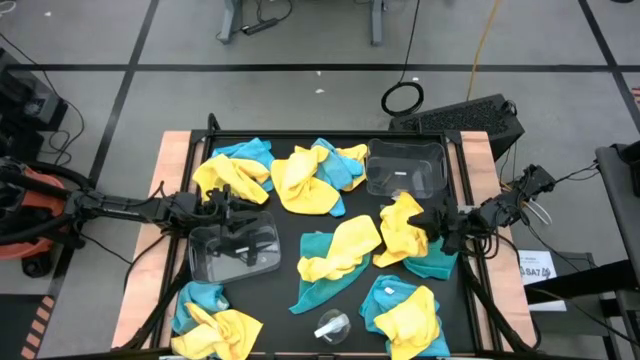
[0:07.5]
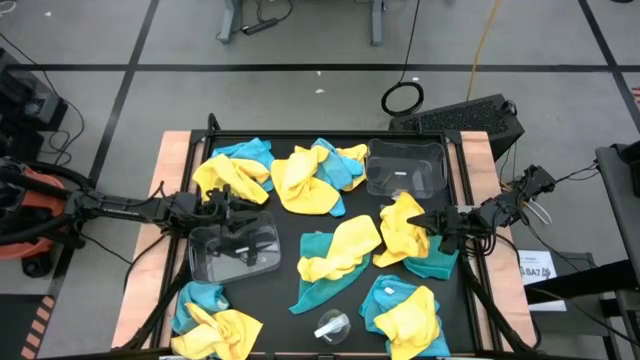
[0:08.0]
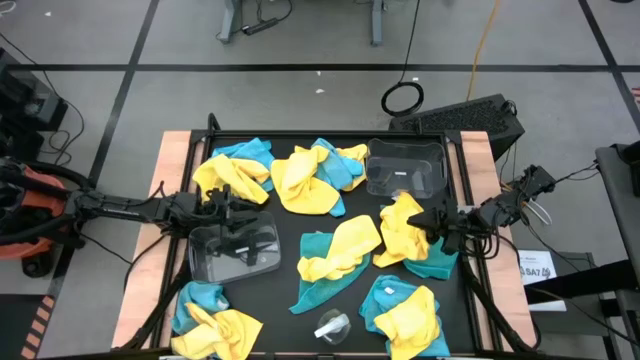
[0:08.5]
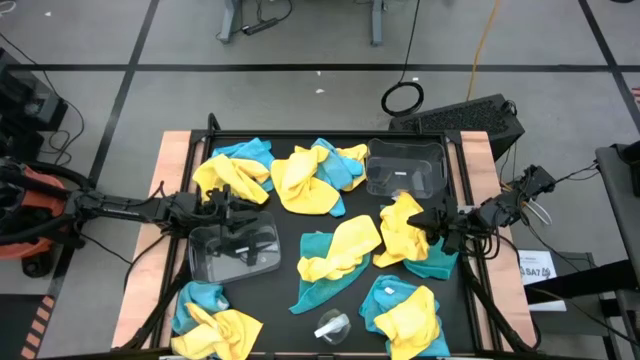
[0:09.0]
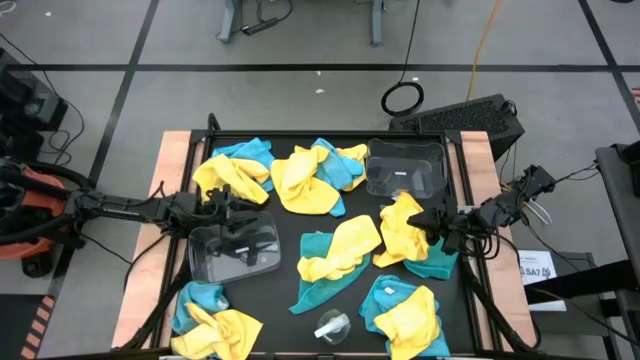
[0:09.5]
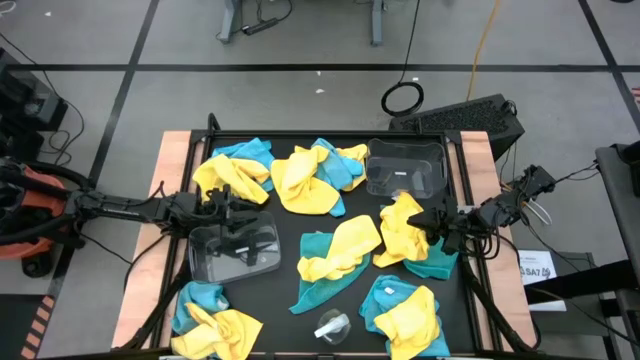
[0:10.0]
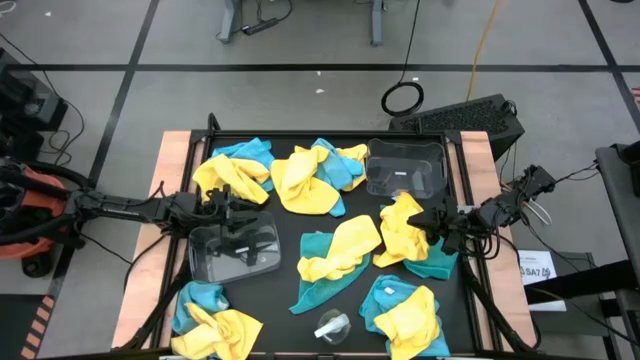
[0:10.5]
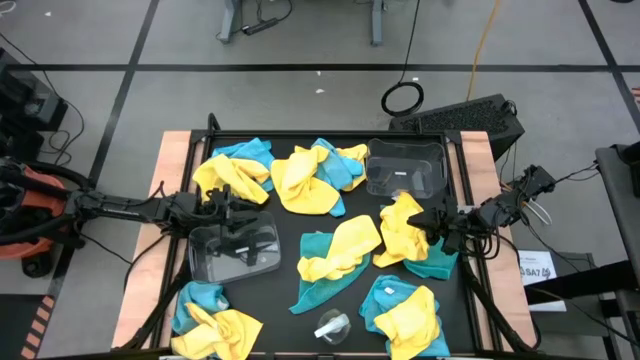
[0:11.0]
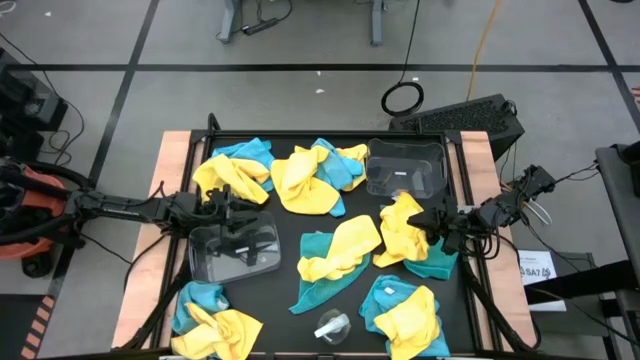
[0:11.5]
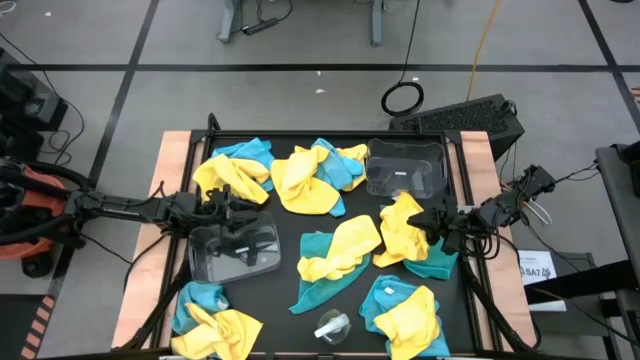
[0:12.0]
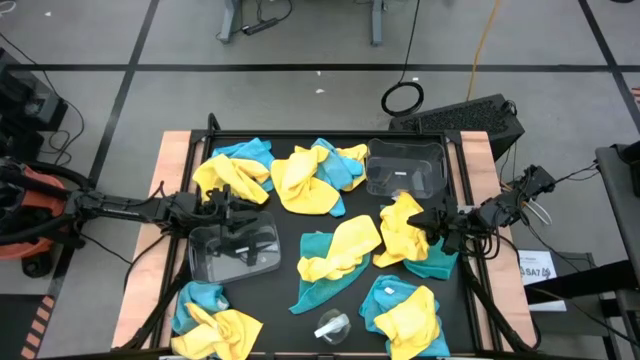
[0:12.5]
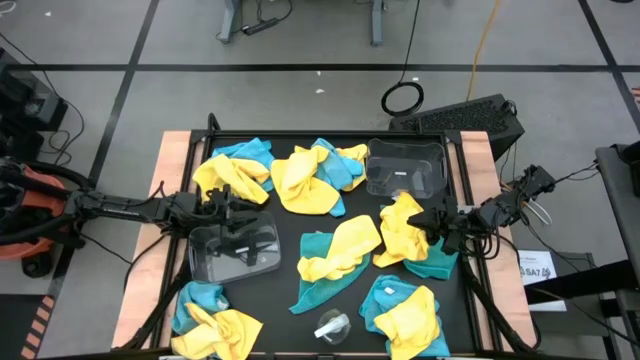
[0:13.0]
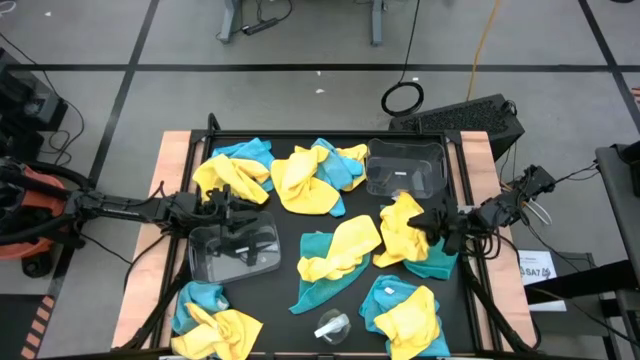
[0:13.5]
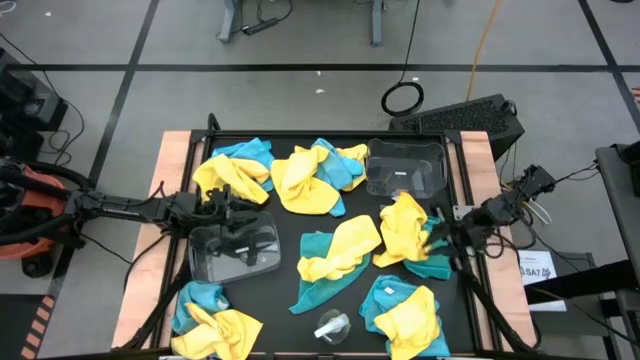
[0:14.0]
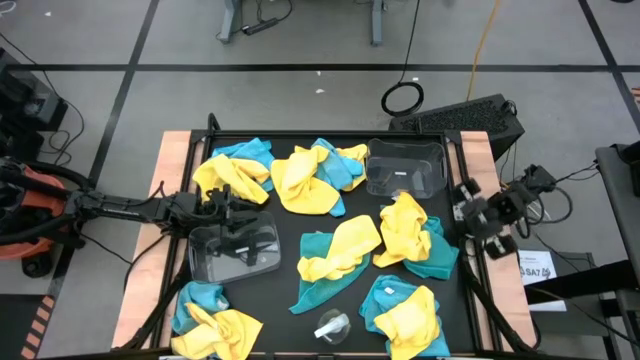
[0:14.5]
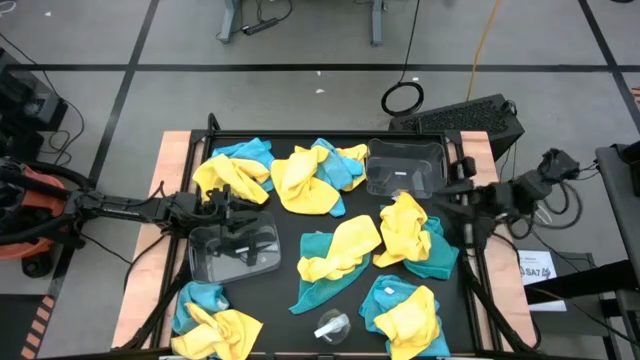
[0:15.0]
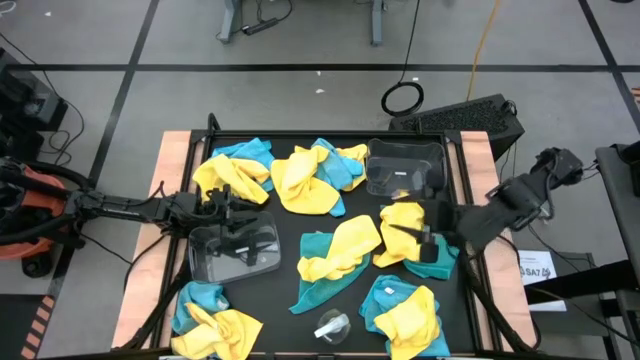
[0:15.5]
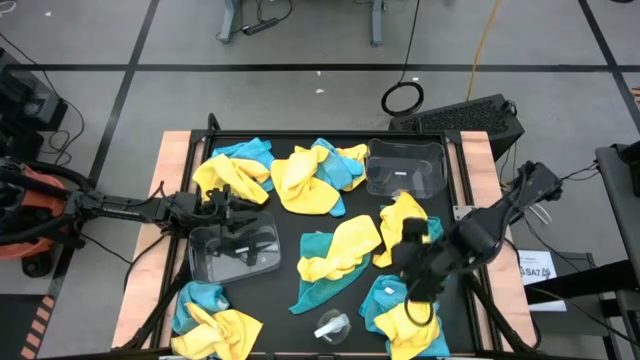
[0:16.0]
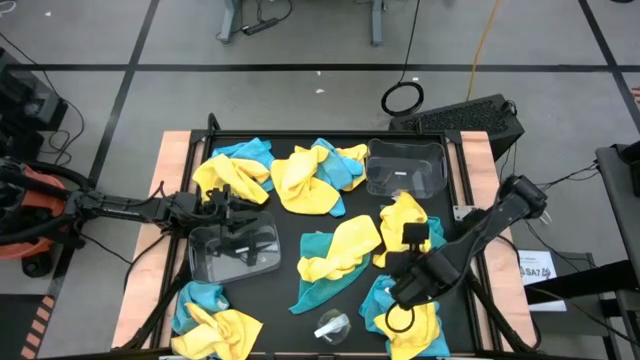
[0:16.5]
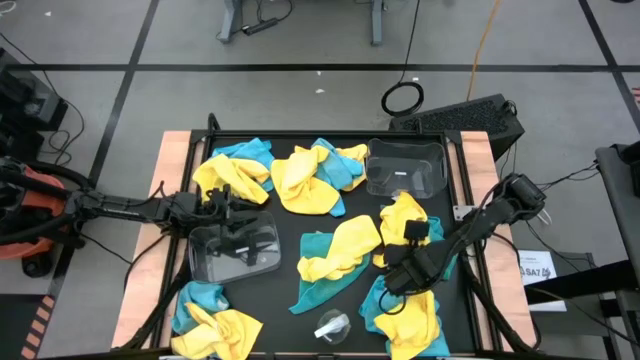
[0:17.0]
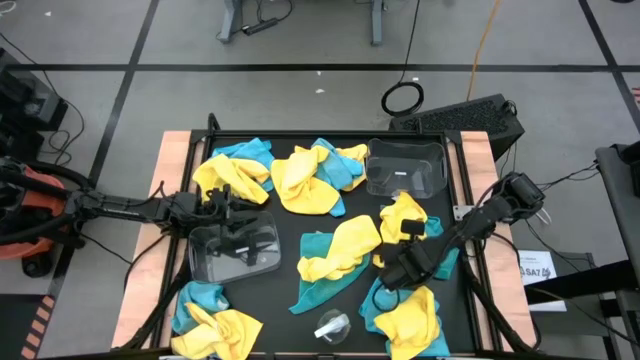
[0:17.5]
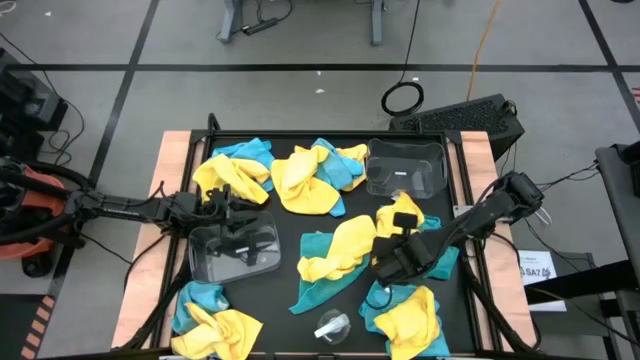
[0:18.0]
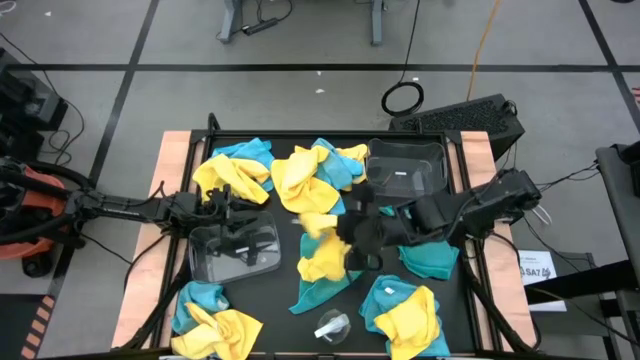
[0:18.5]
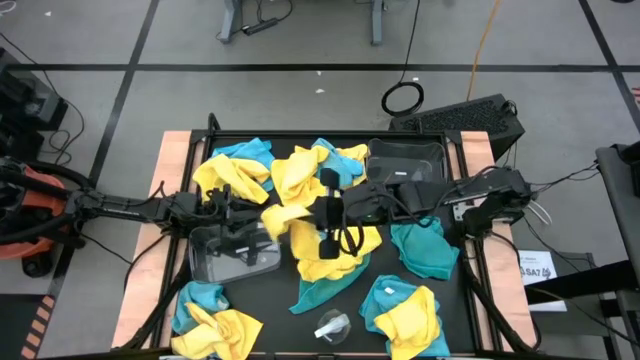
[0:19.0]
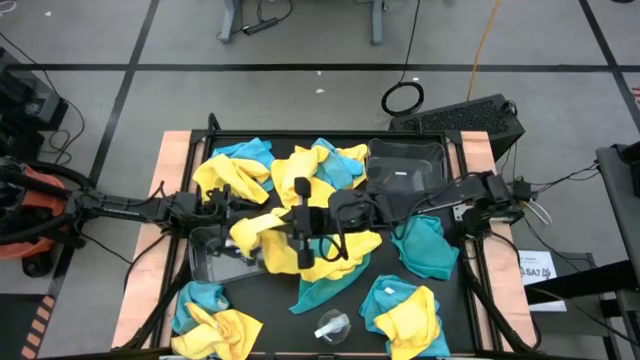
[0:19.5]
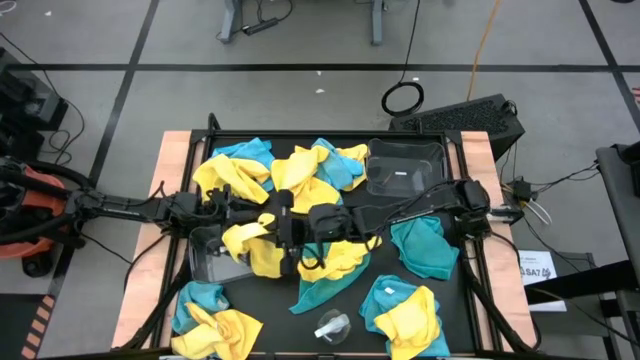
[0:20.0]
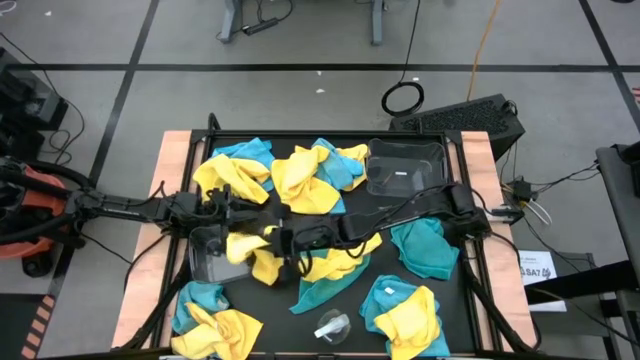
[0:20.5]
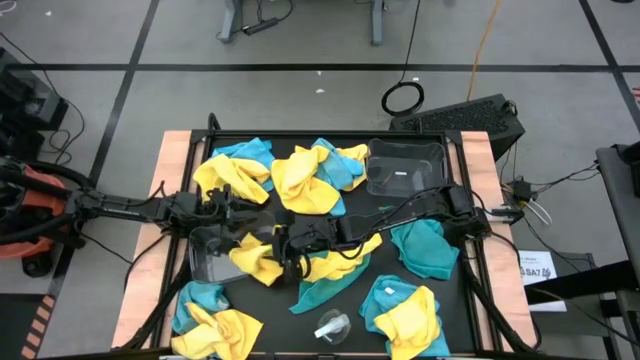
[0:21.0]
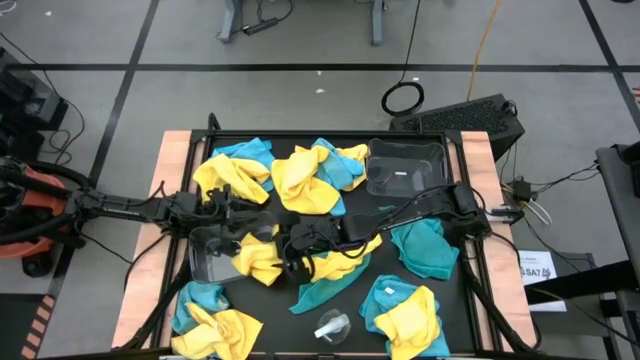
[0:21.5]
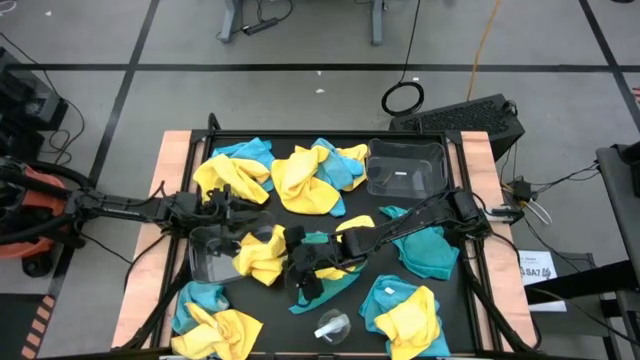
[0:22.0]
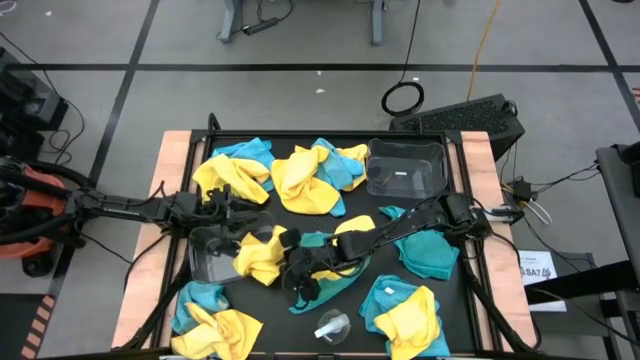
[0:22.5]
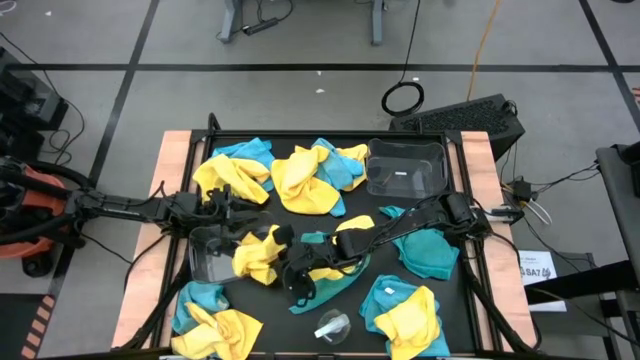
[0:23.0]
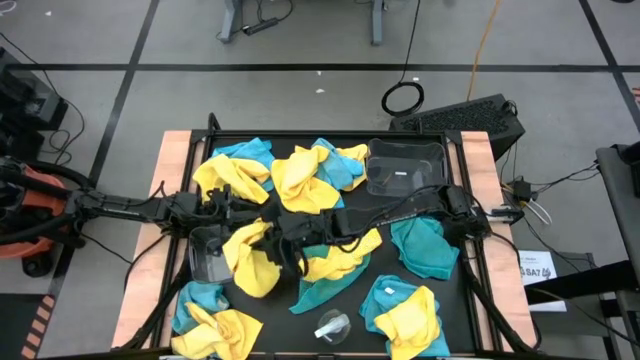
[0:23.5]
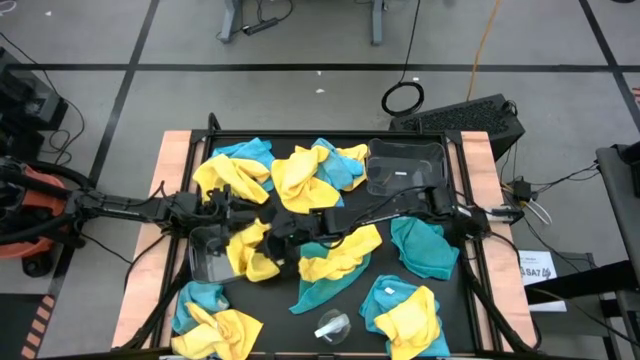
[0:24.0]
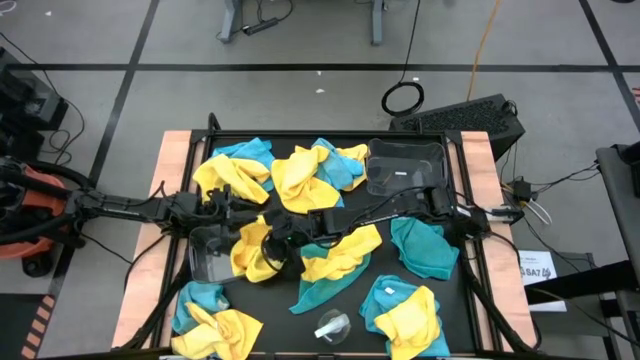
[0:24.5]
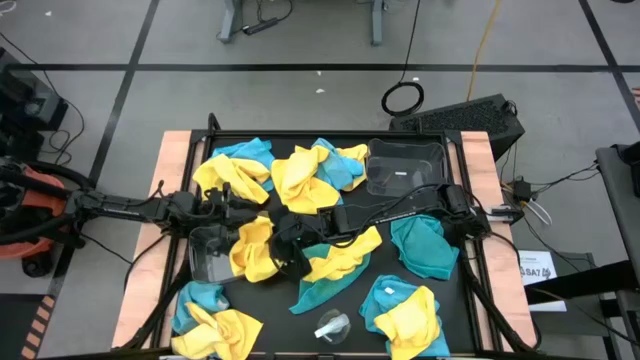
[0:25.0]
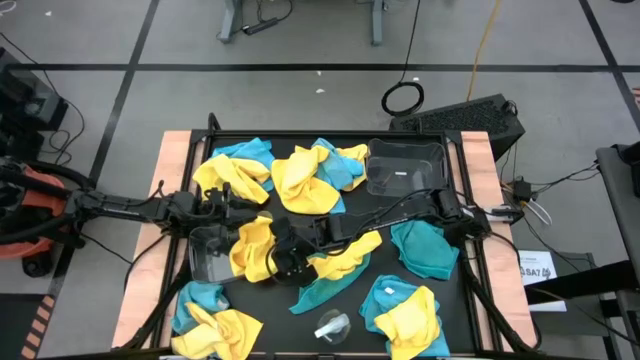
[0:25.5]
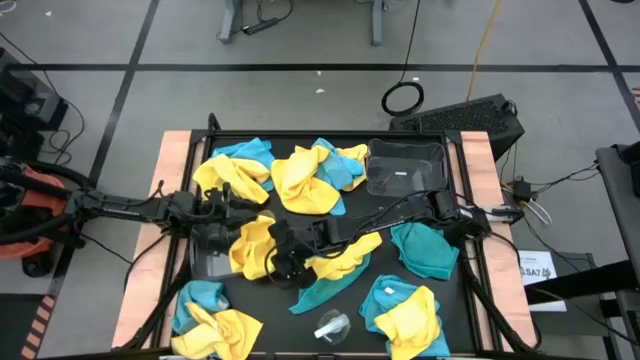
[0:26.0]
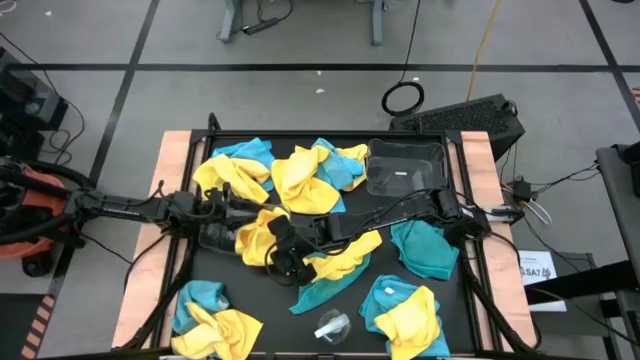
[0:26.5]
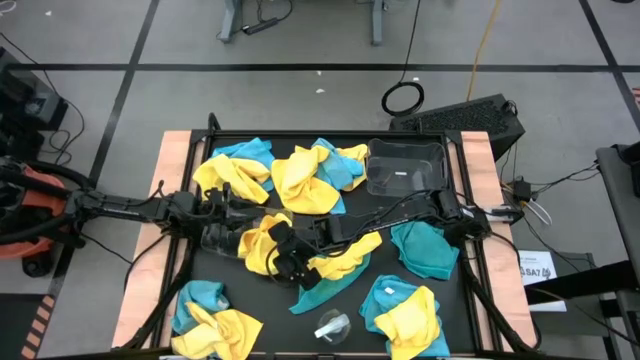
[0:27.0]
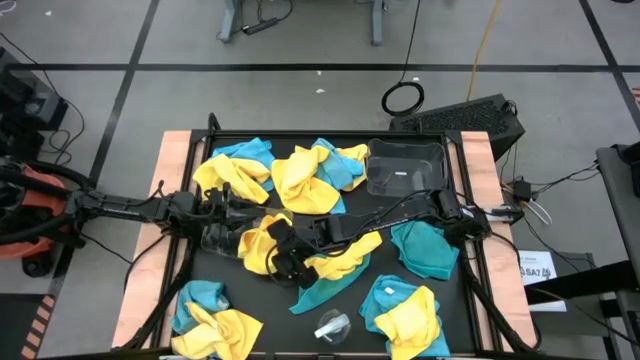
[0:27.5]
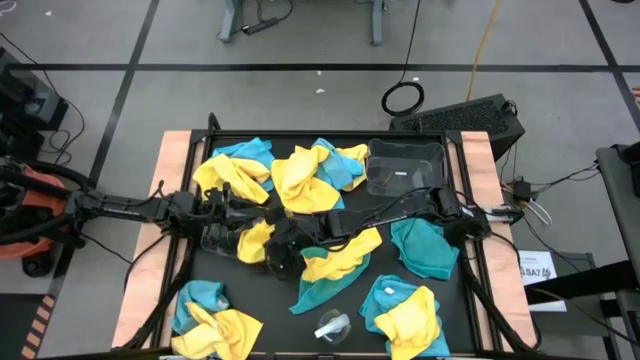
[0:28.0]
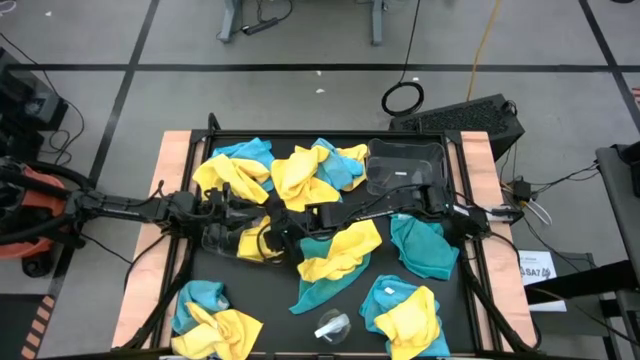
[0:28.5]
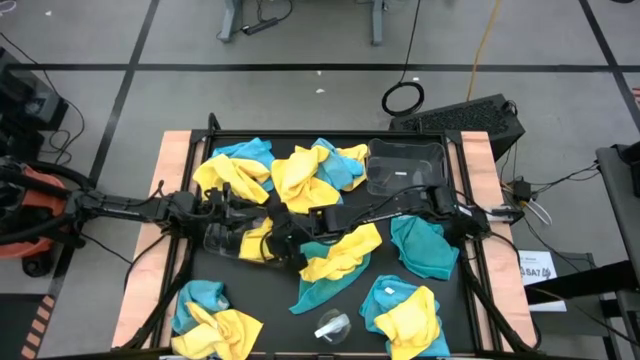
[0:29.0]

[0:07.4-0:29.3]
Task: Sort microfiber towel by color & place in baskets
Put the yellow microfiber towel into the bottom transparent bin
